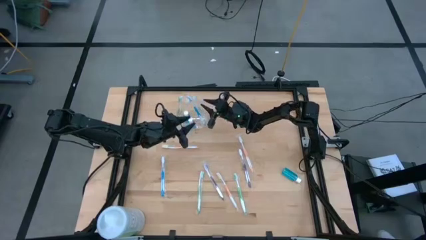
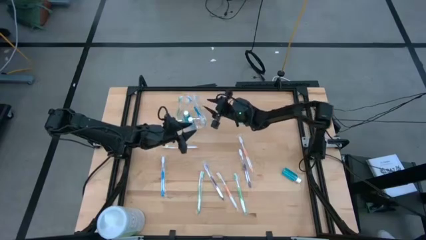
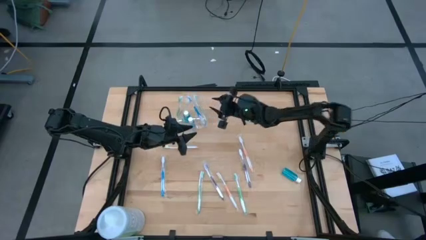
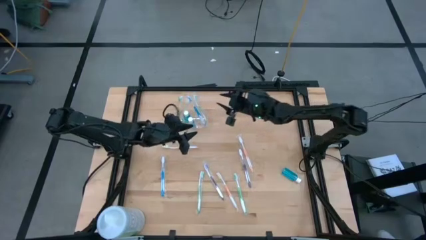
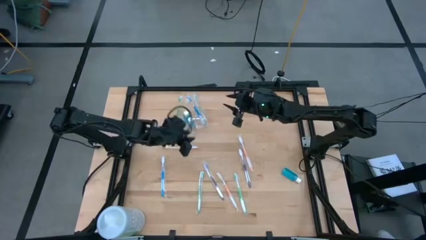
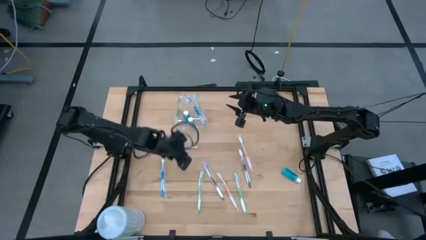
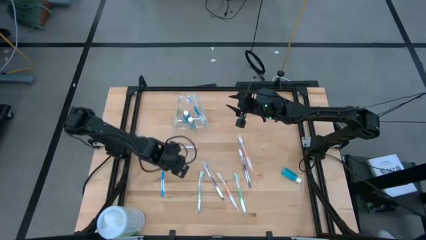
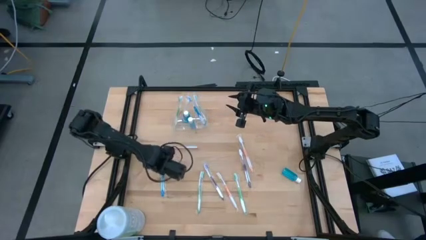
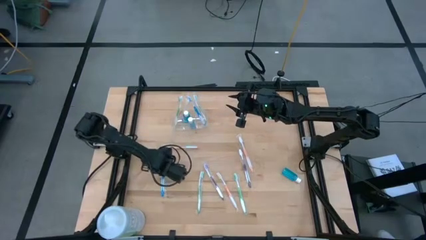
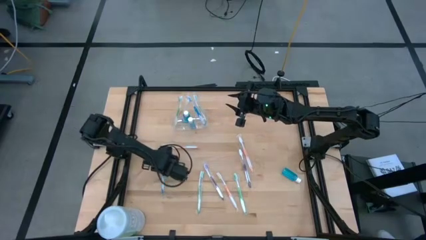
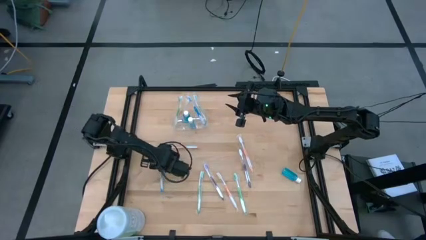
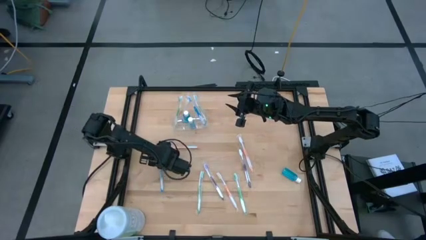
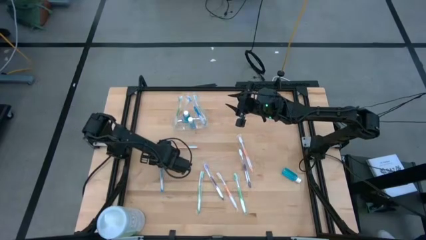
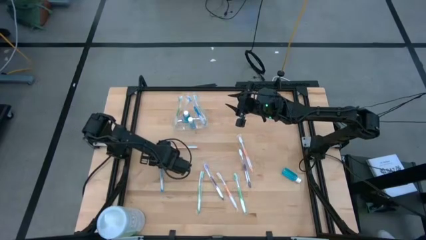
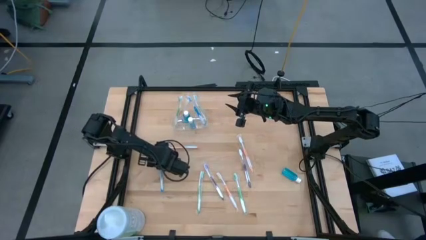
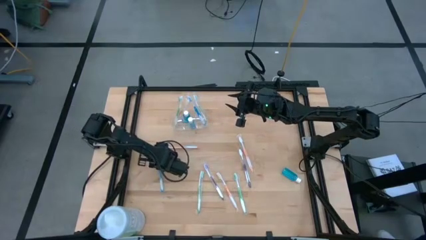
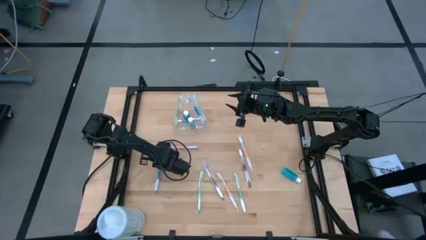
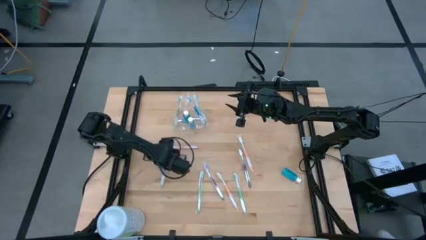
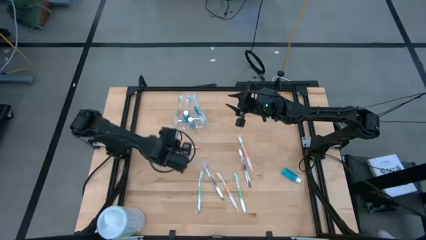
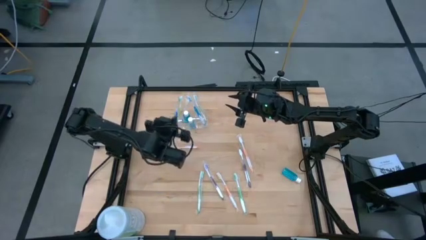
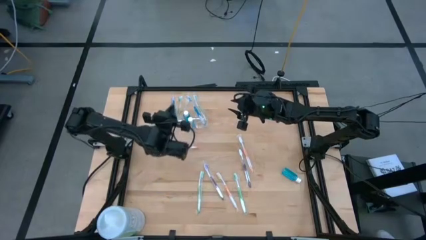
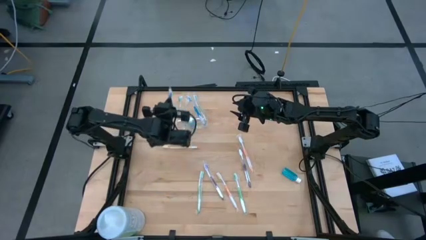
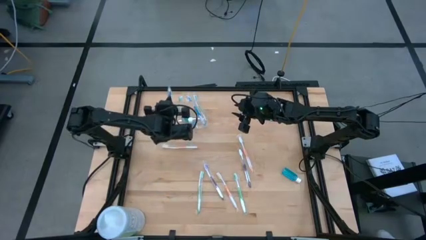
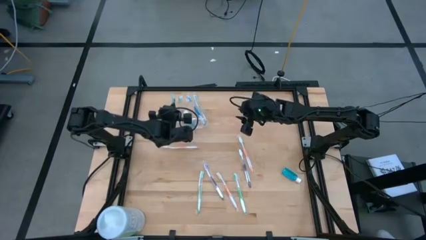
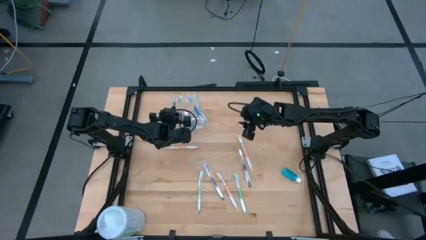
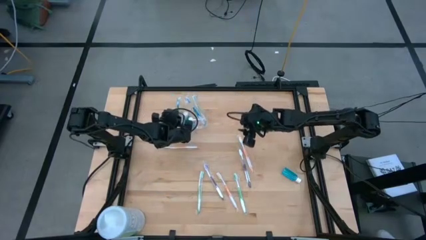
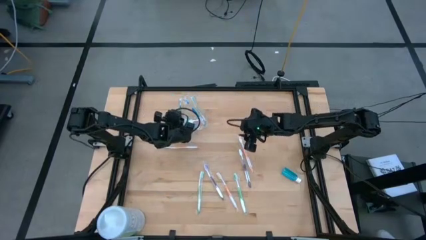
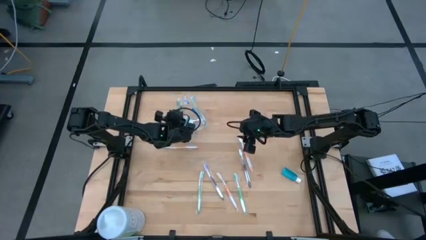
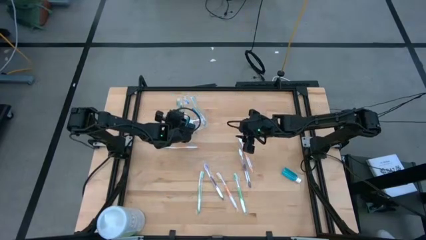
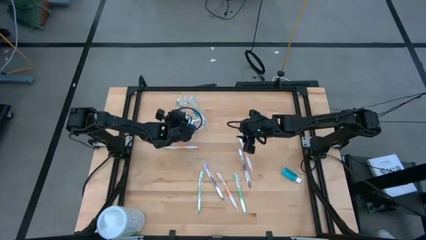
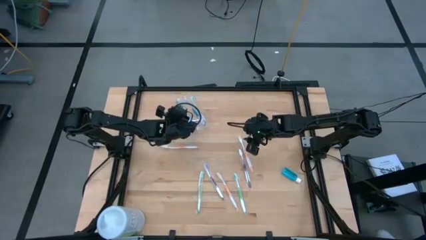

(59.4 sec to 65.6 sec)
Task: Pick & Place toothbrushing station
Put the blue toothbrush into the transparent organizer

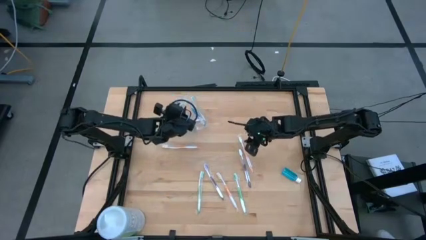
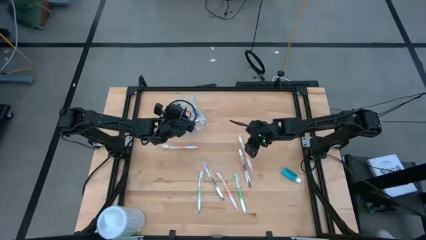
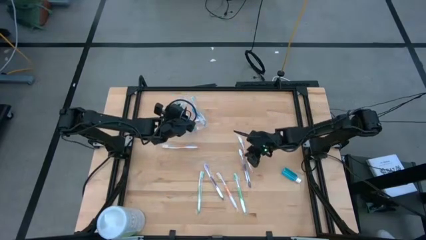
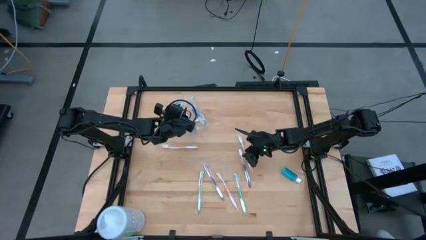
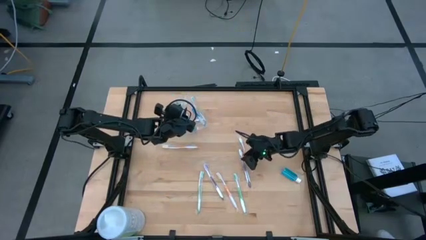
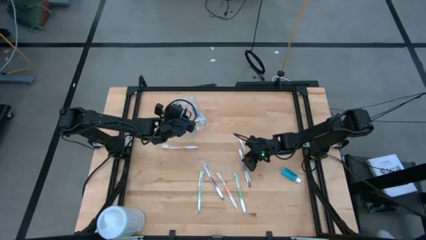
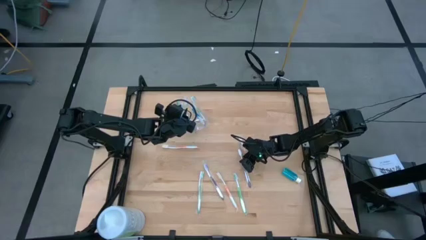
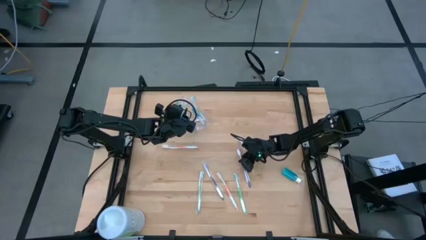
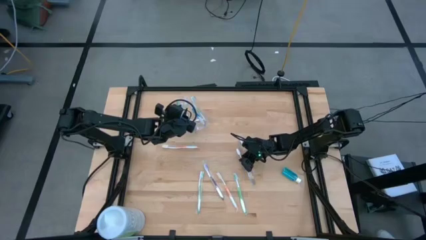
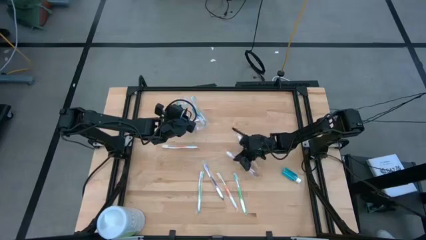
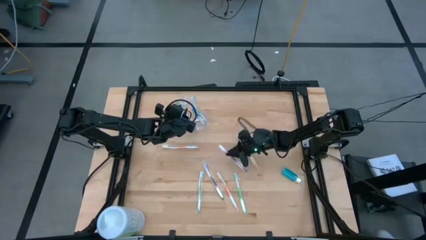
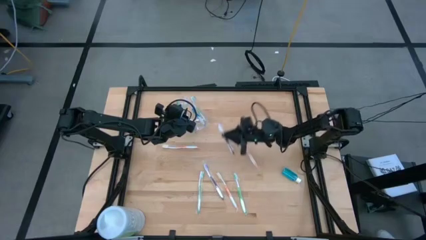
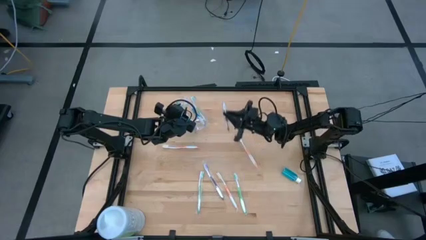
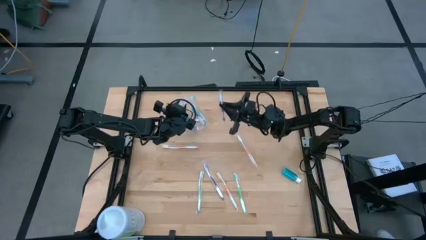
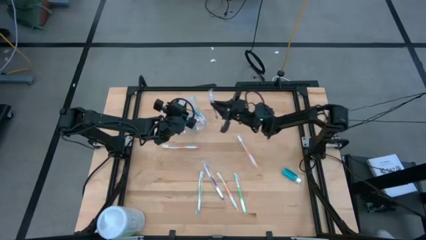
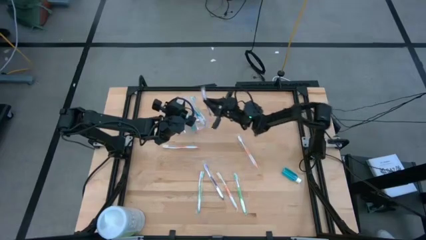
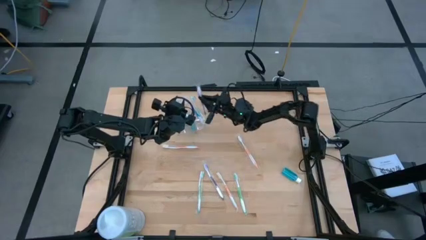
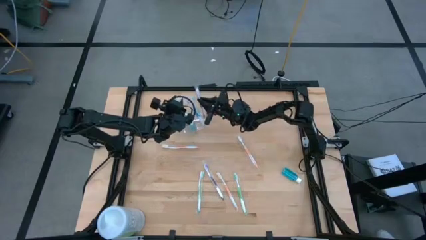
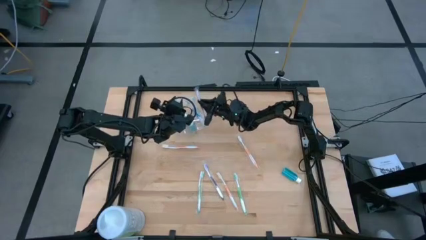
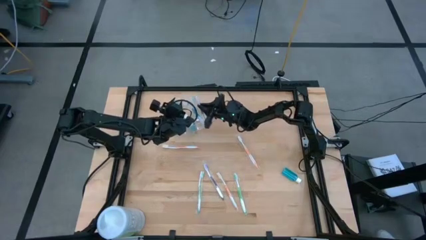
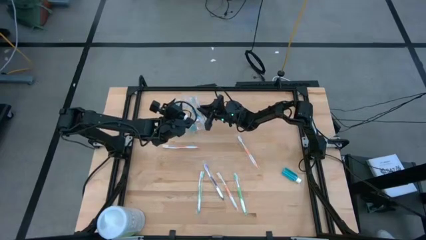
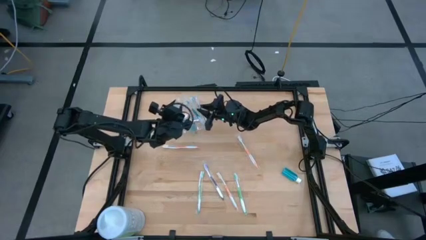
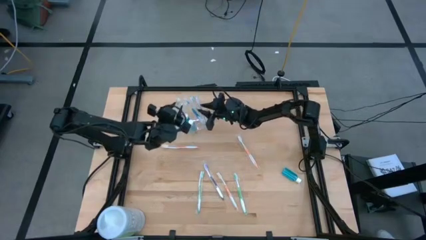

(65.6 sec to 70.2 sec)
Put the violet toothbrush into the transparent organizer

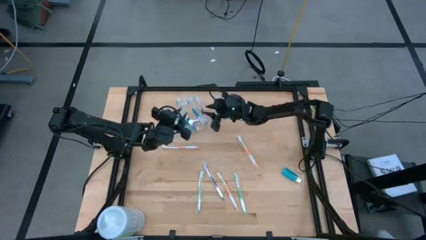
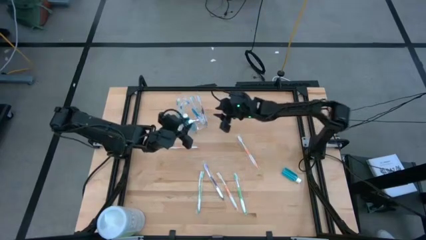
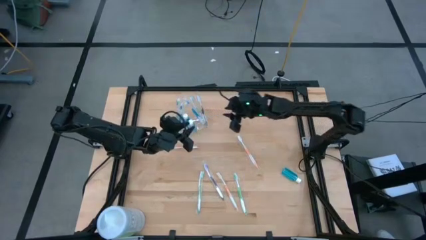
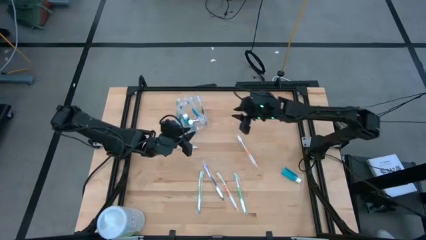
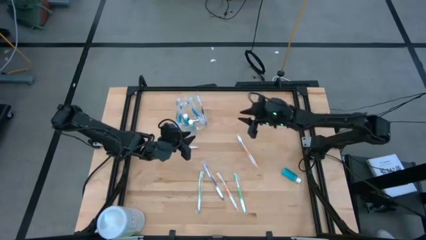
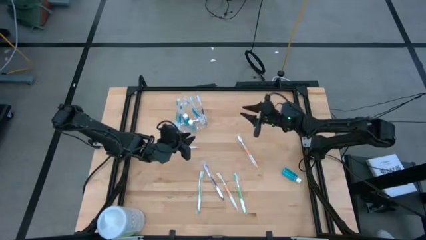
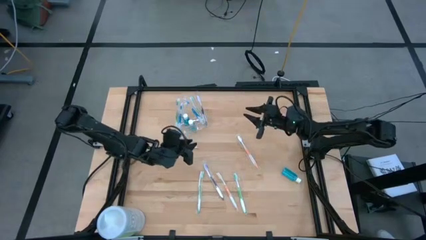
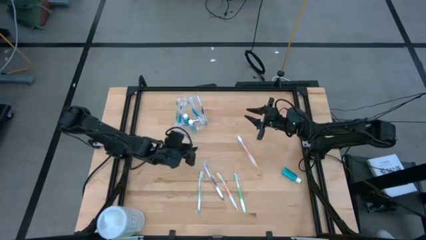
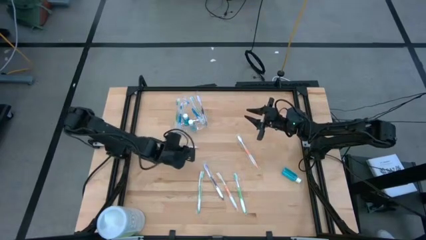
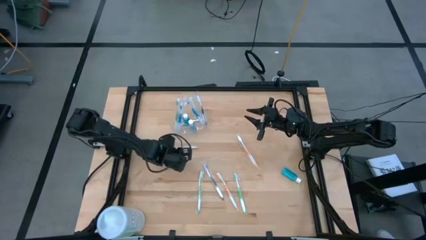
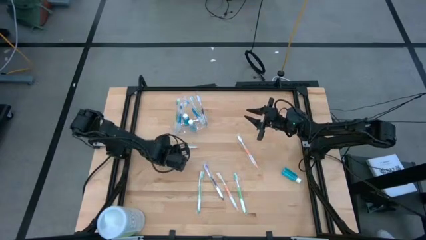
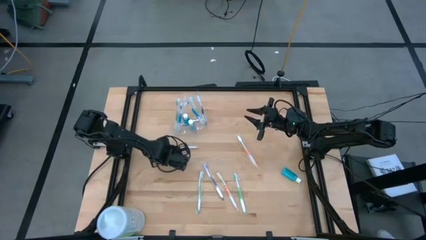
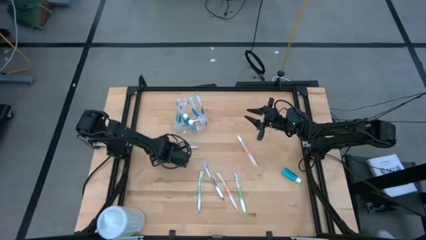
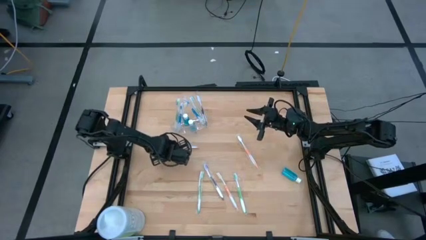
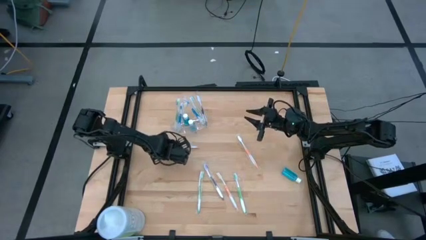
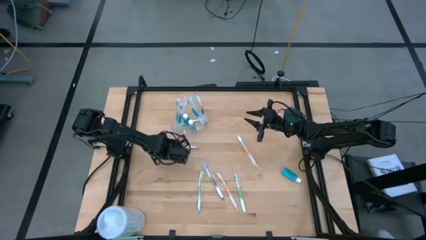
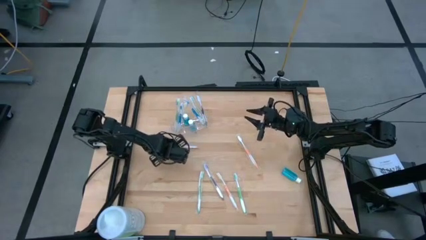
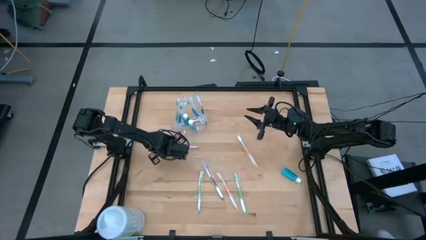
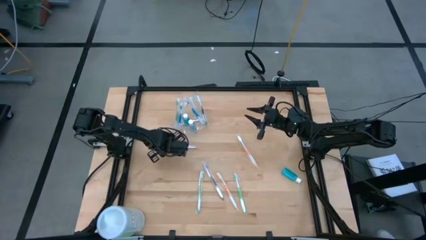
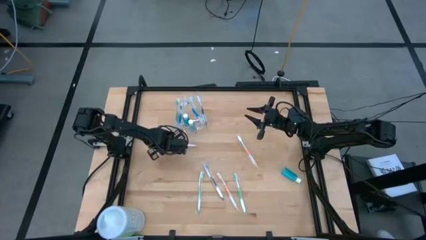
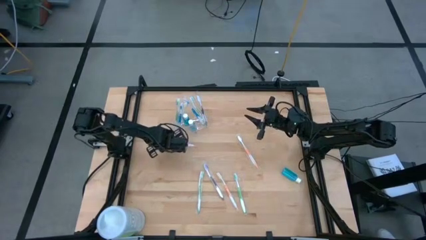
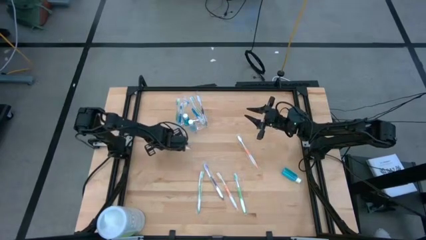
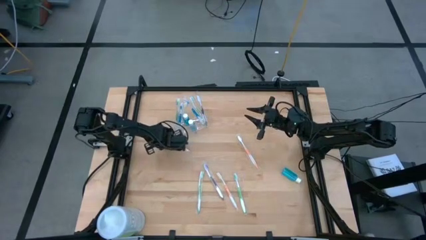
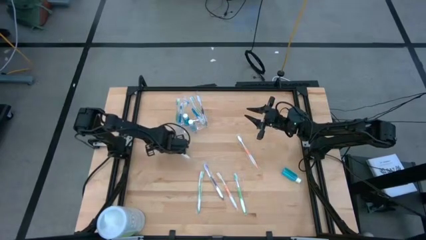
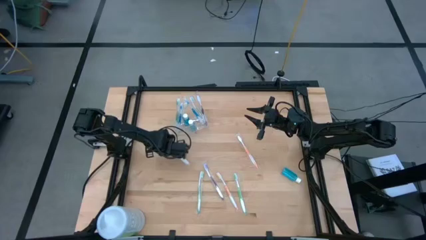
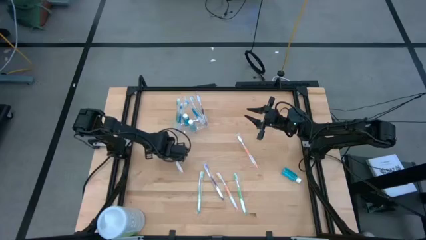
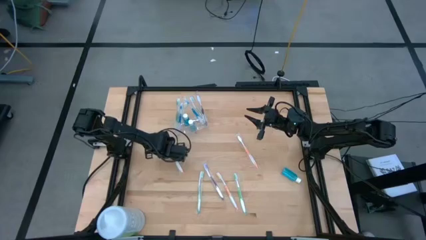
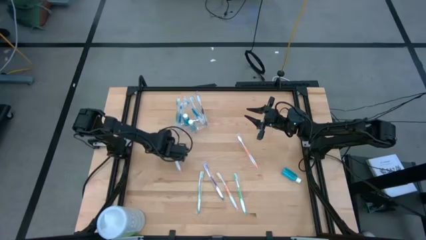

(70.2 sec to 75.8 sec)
Put the orange toothbrush into the transparent organizer
